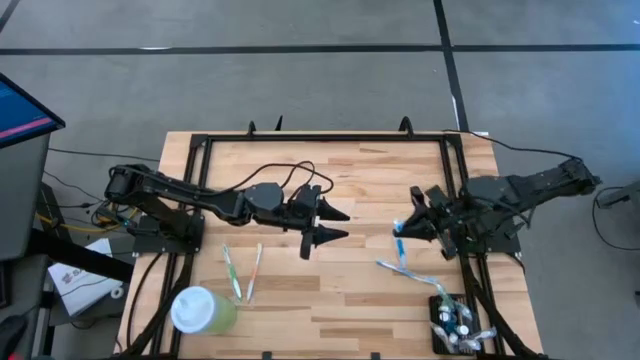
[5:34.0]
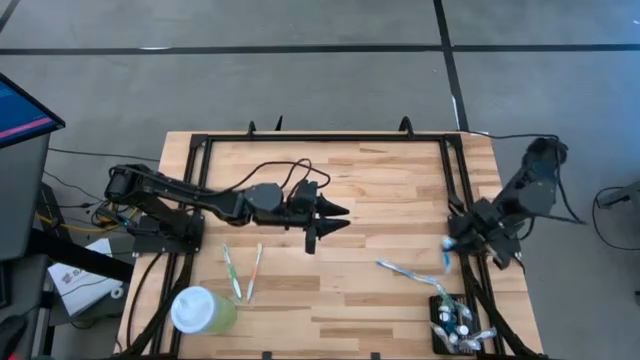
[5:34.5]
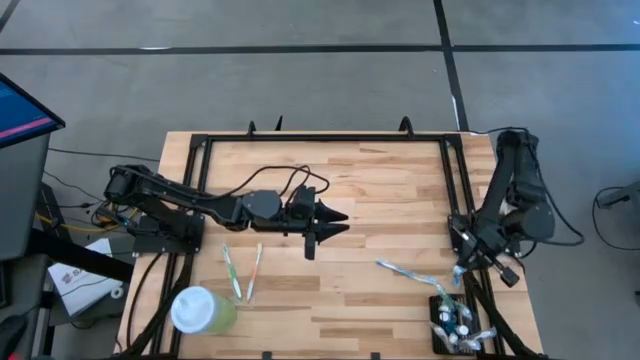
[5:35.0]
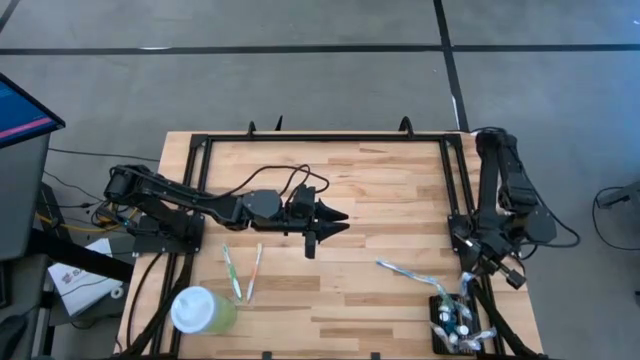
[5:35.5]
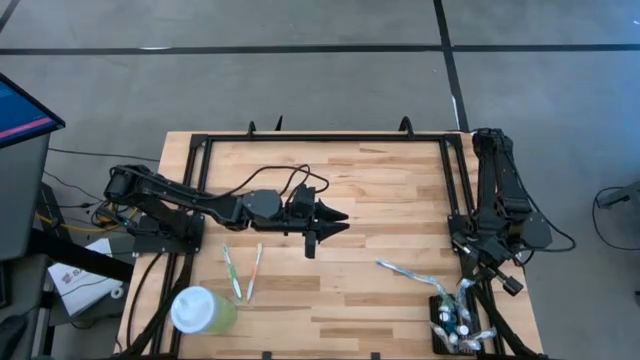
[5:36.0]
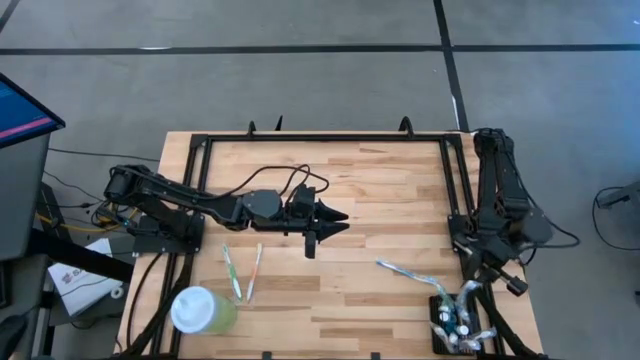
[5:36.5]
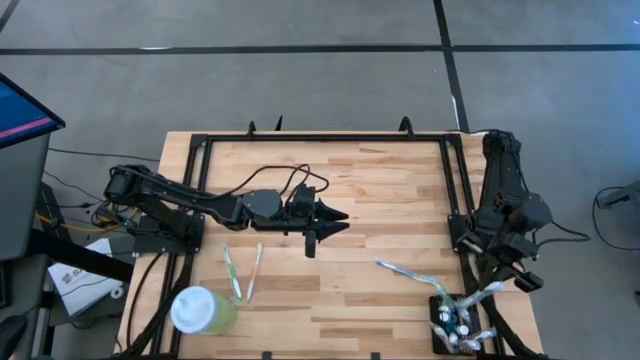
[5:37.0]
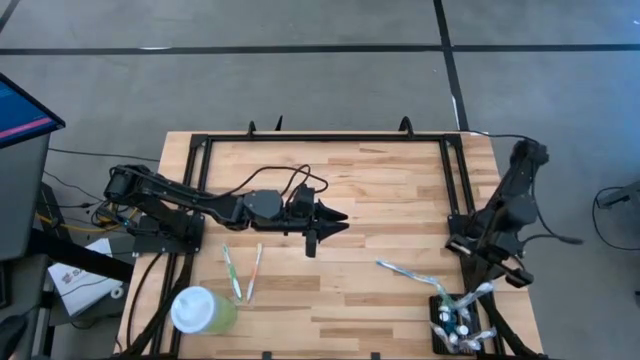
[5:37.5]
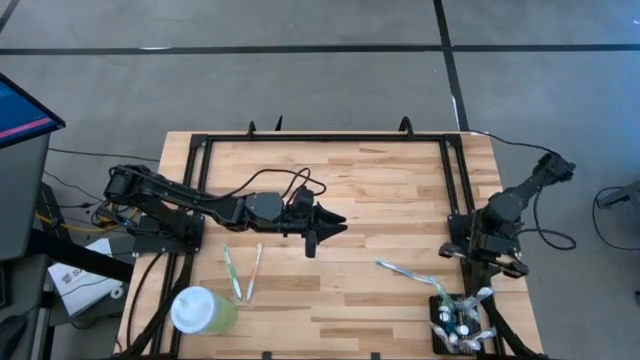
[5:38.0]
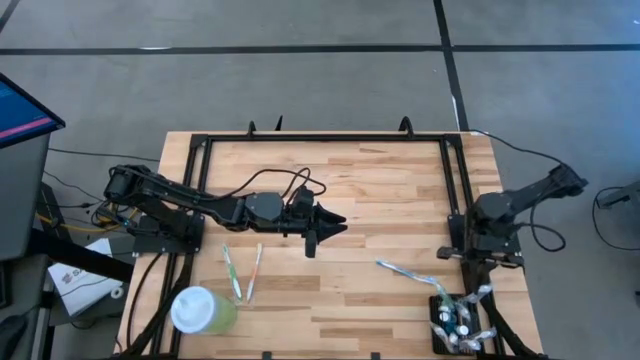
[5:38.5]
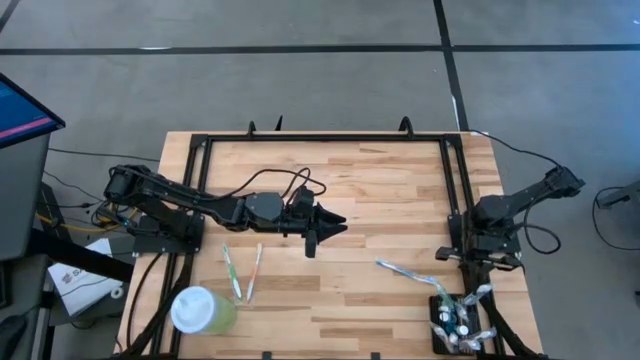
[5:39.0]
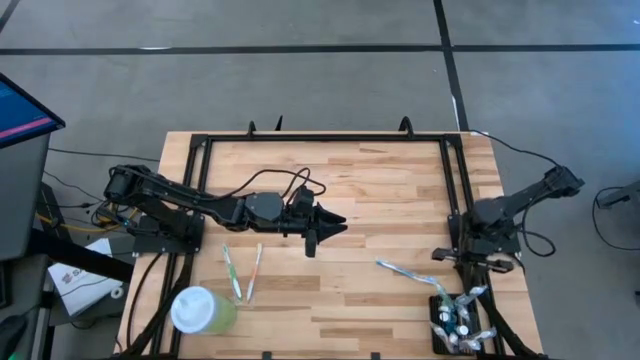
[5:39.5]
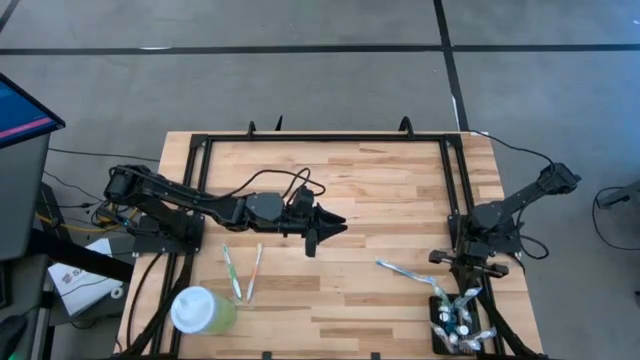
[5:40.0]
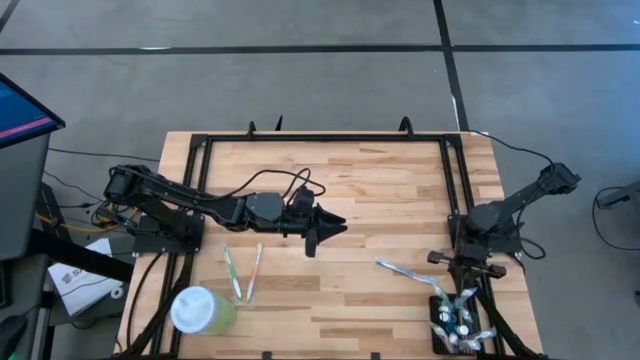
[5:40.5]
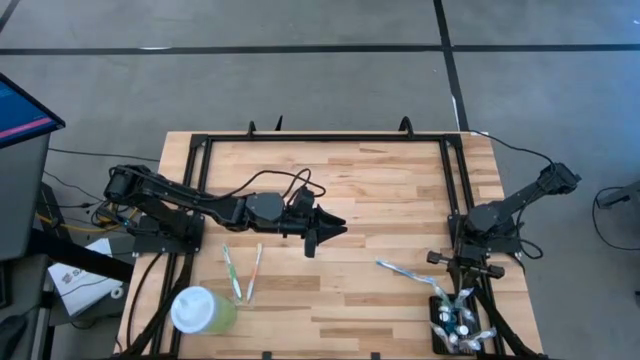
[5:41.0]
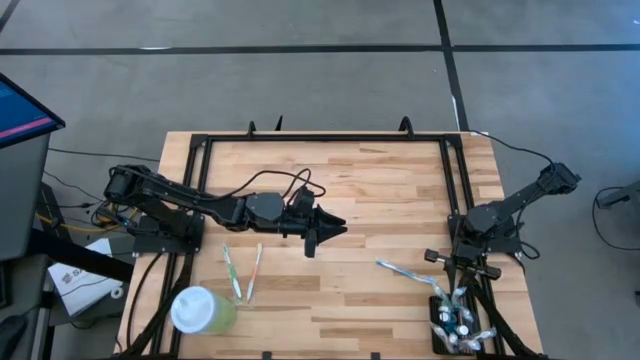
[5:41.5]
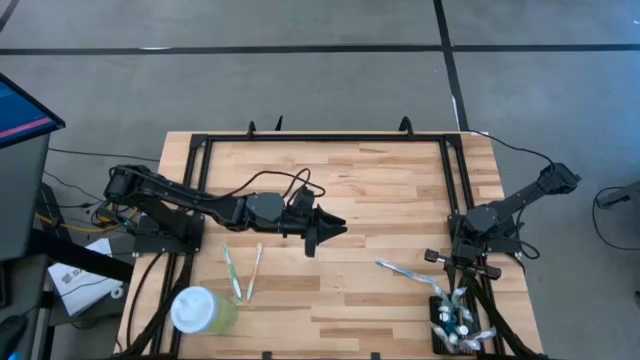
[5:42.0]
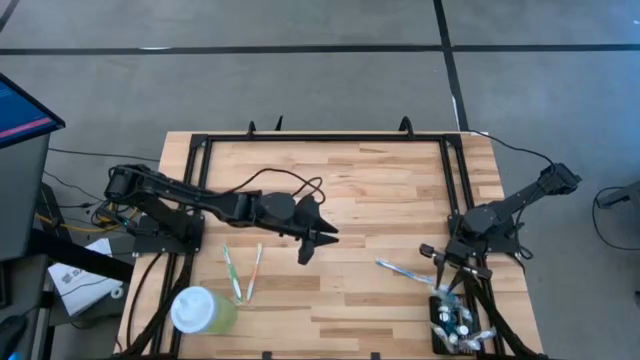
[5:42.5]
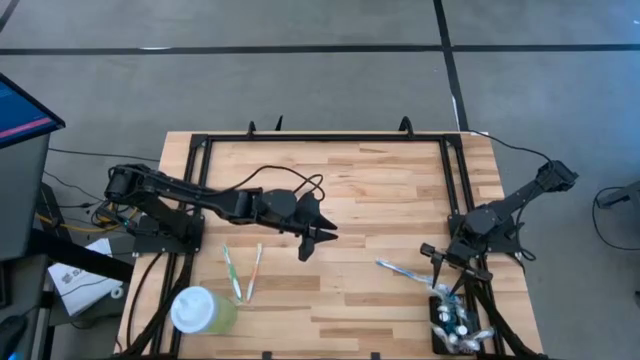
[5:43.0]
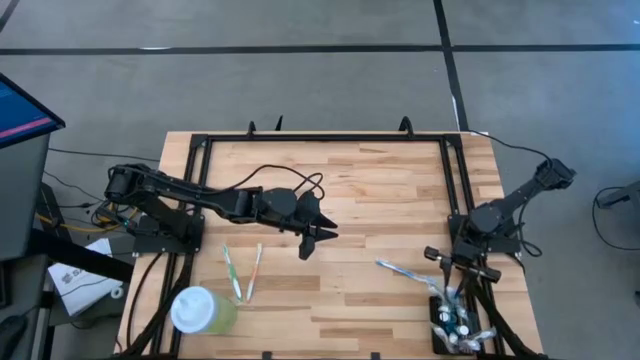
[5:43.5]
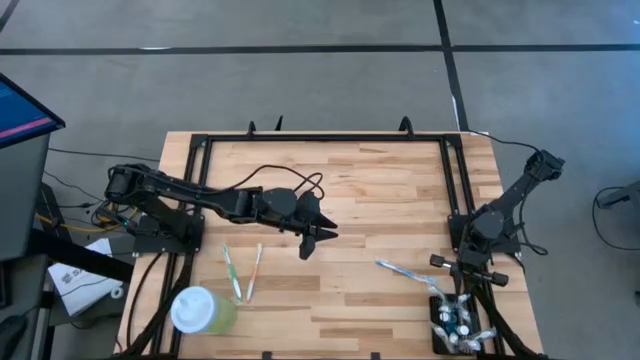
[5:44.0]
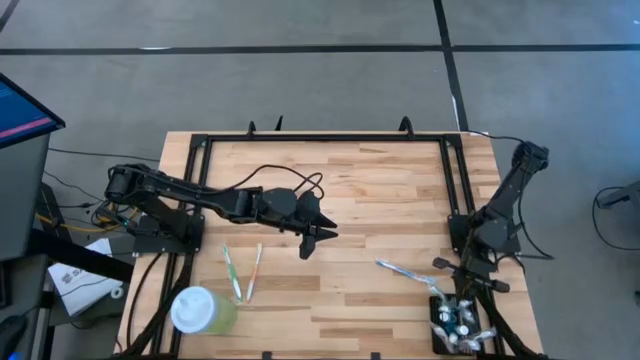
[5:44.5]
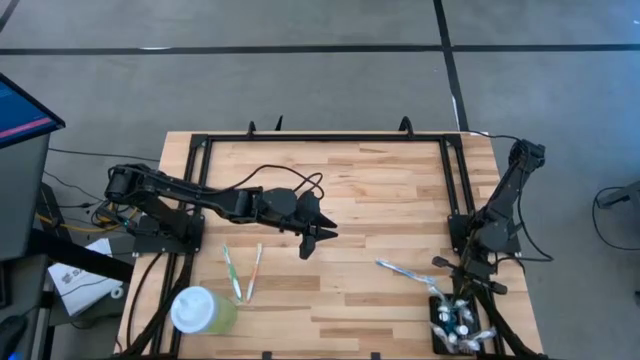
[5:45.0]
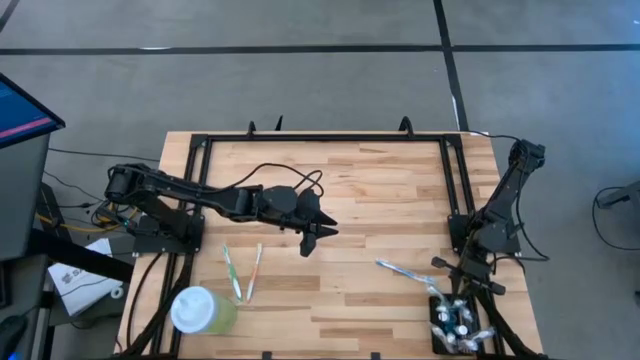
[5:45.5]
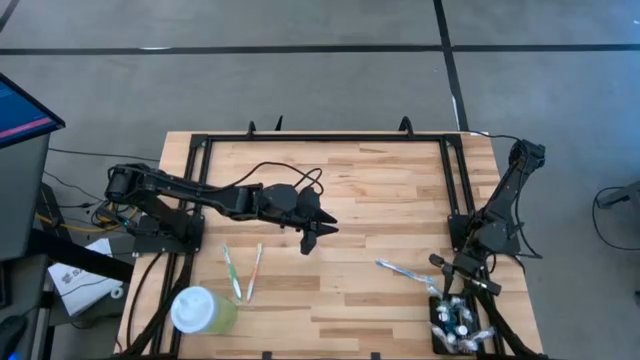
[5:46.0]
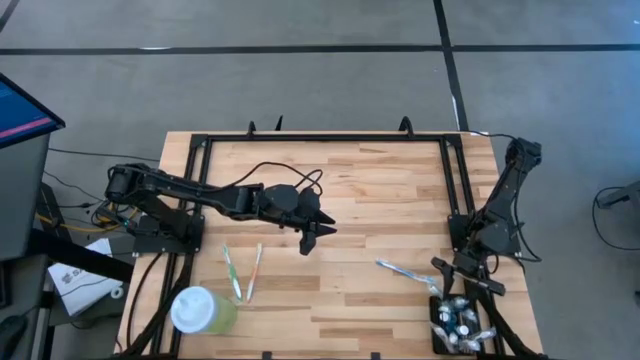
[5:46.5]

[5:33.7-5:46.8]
Task: Pick & Place toothbrushing station
Put the left blue toothbrush into the black organizer

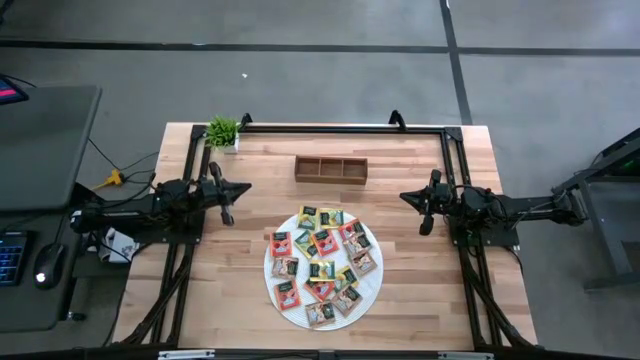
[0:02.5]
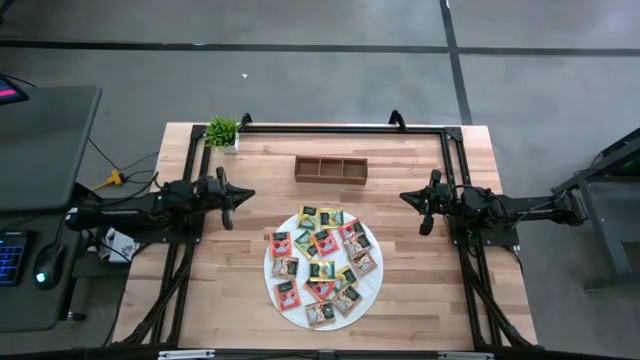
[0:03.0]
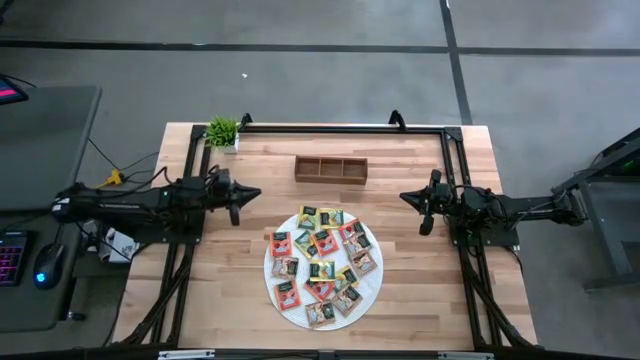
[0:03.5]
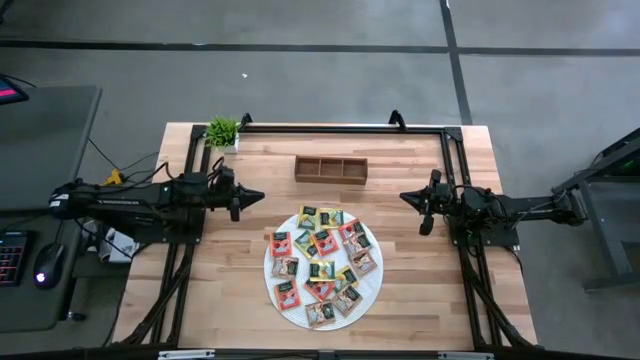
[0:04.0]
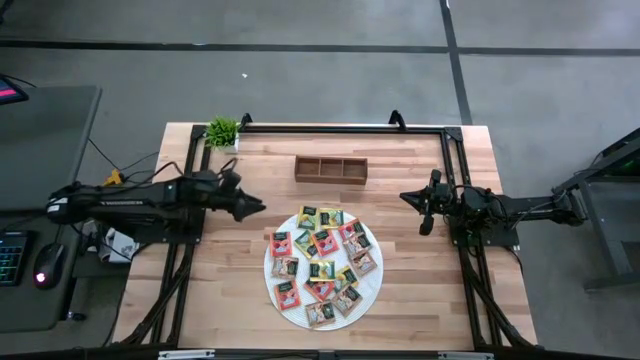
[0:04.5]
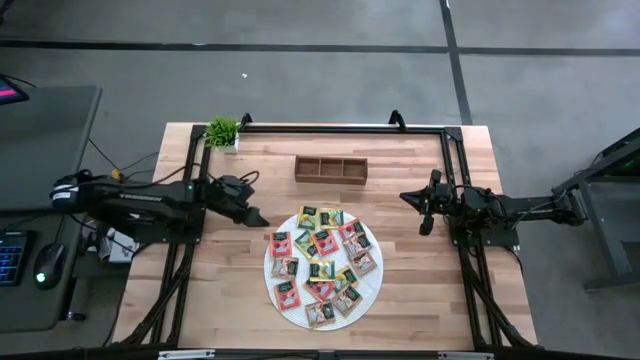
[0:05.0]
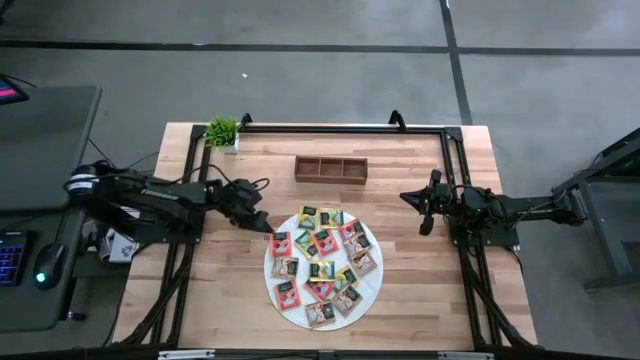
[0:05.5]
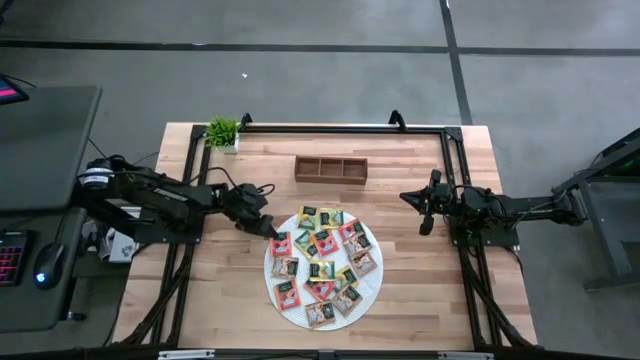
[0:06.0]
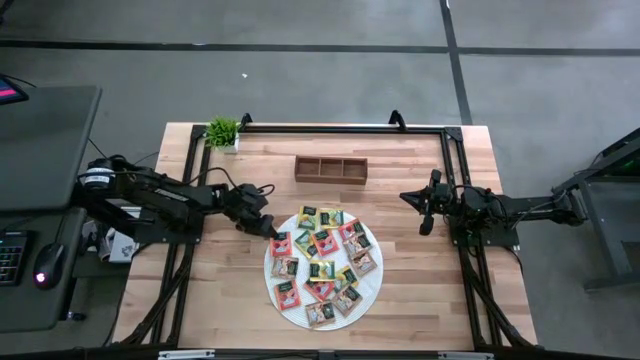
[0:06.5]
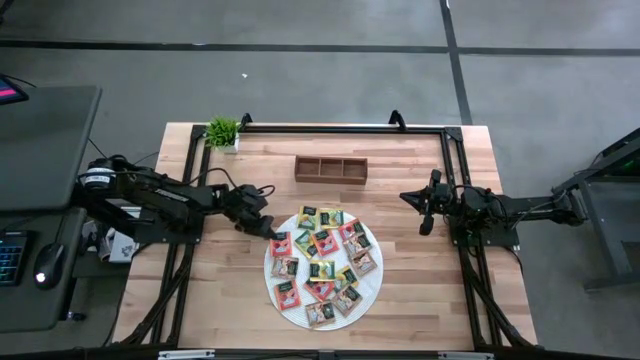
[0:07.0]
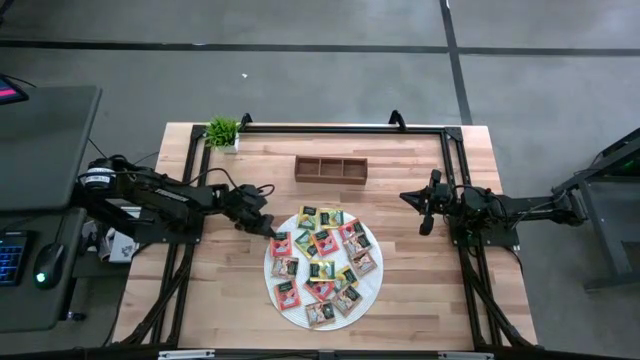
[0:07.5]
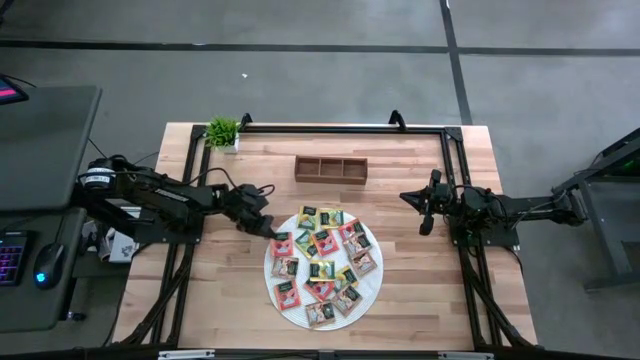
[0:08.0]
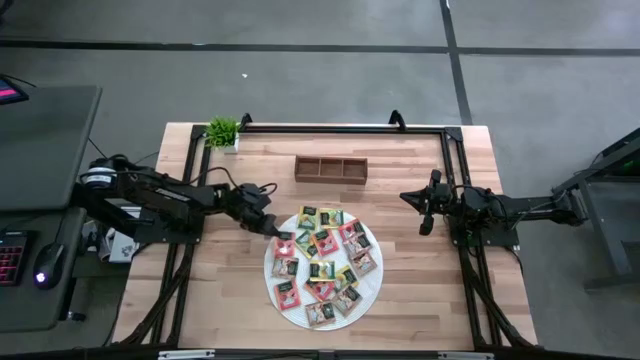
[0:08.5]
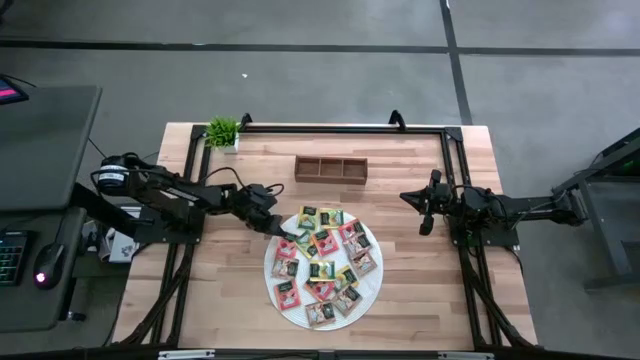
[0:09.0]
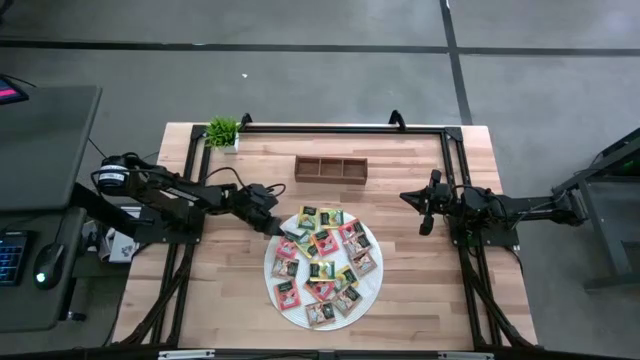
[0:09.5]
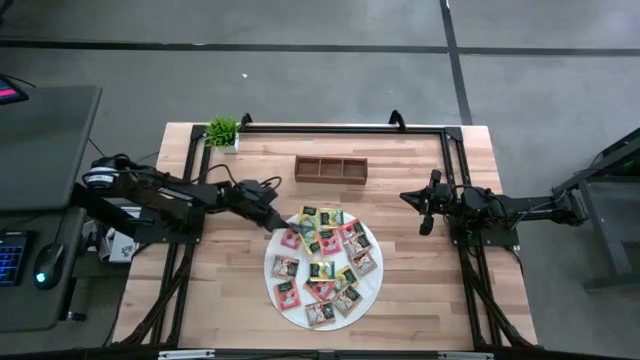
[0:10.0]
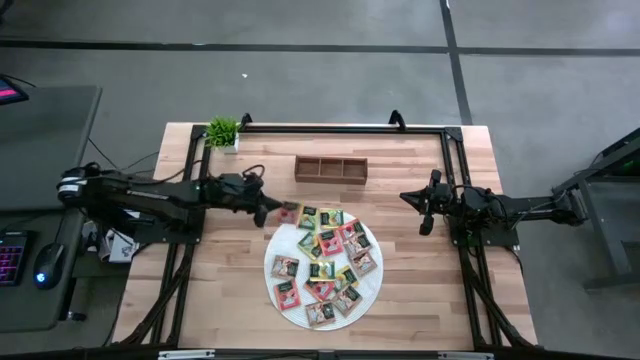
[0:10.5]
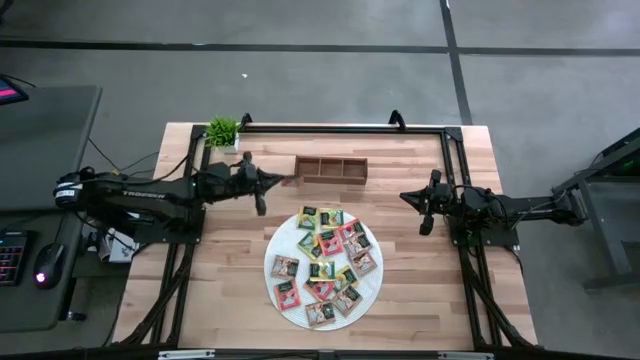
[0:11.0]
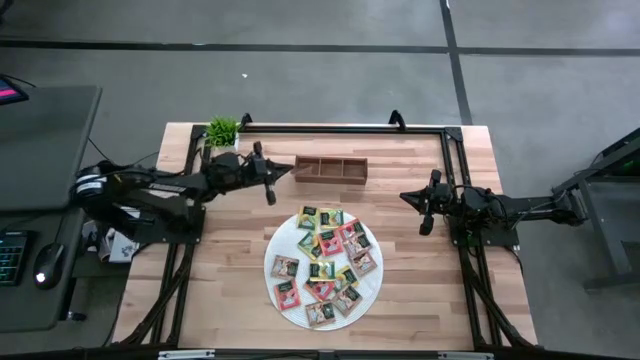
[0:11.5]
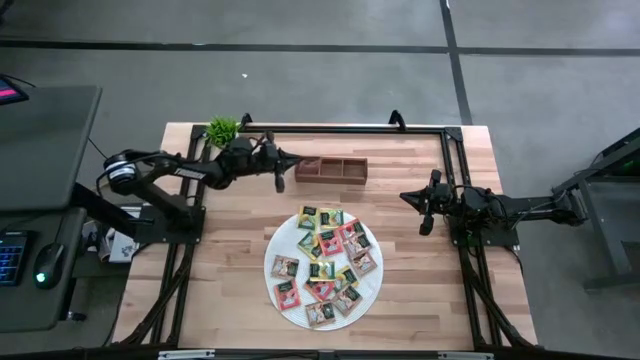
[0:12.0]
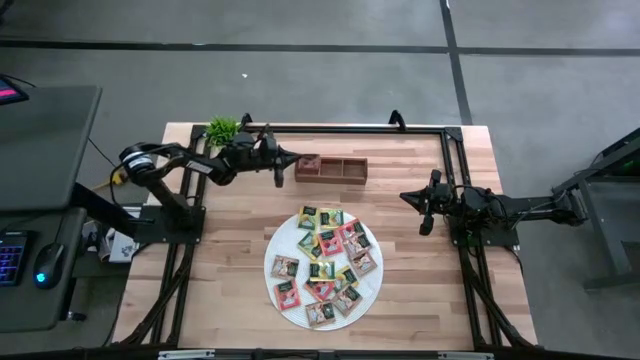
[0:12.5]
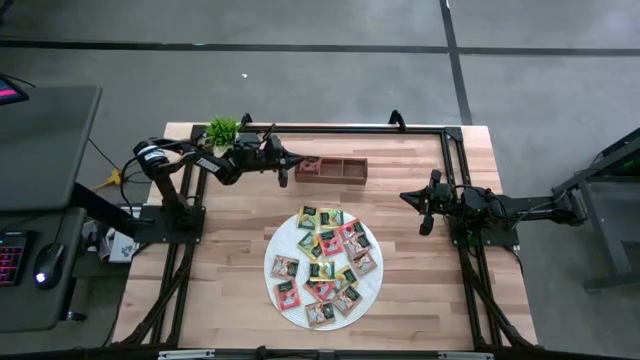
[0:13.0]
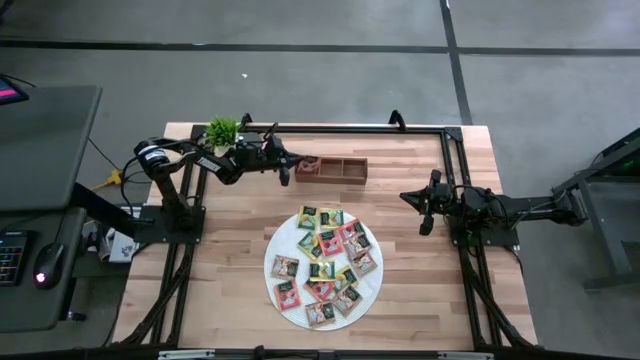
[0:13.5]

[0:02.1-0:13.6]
Task: Pick & Place Tea
Put the orange tea bag into the left section of the wooden organizer
